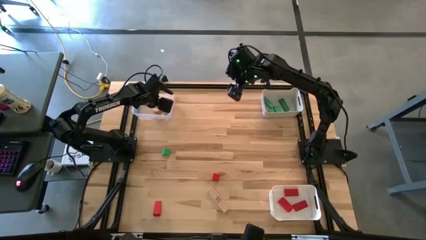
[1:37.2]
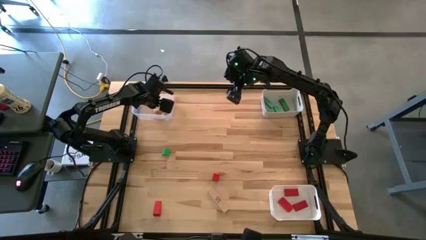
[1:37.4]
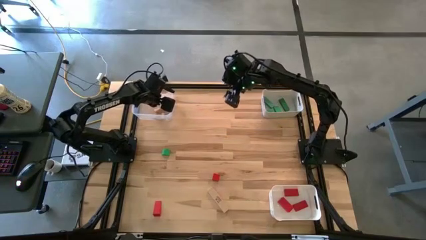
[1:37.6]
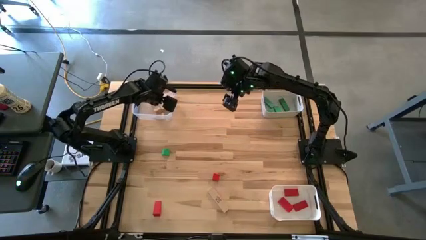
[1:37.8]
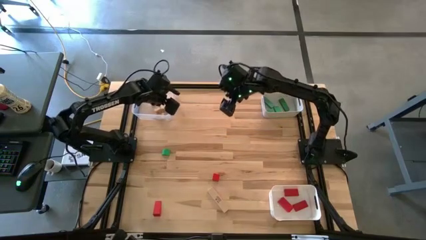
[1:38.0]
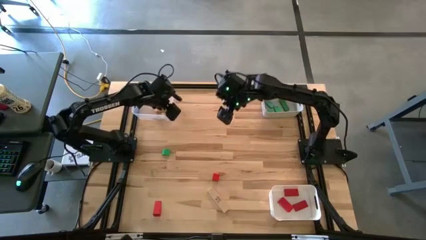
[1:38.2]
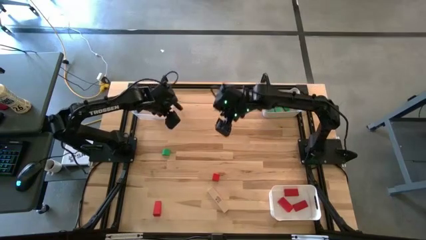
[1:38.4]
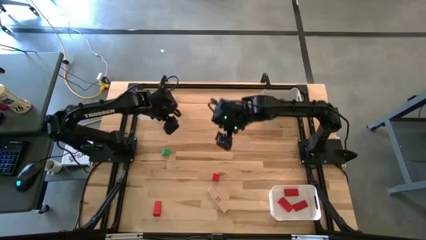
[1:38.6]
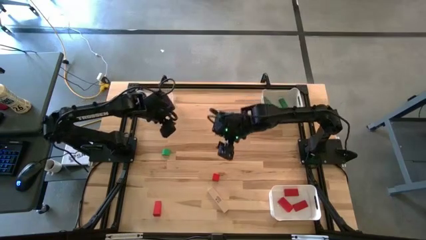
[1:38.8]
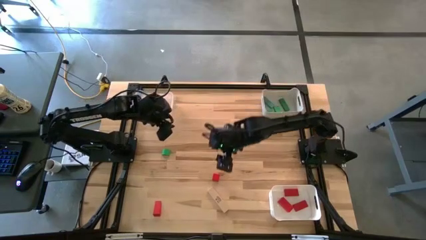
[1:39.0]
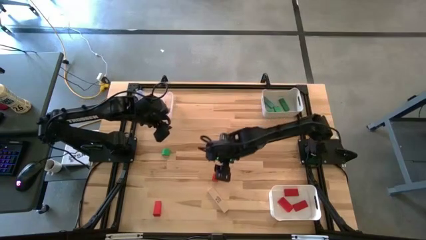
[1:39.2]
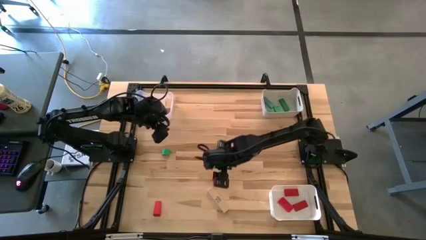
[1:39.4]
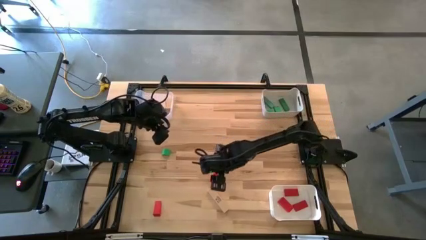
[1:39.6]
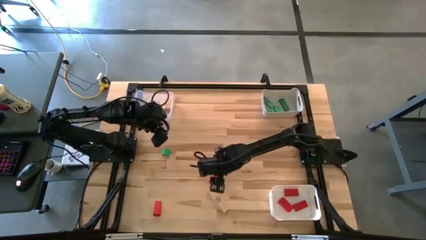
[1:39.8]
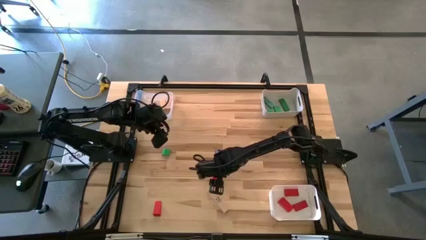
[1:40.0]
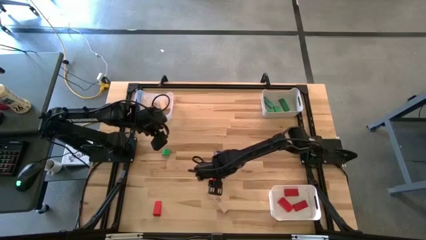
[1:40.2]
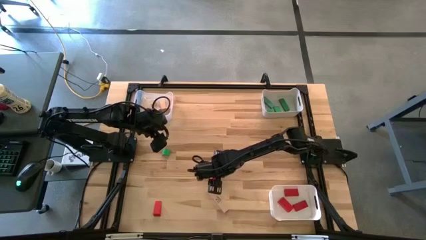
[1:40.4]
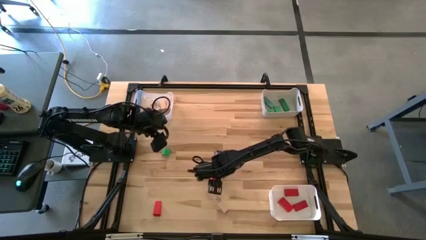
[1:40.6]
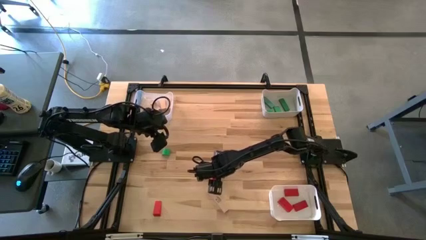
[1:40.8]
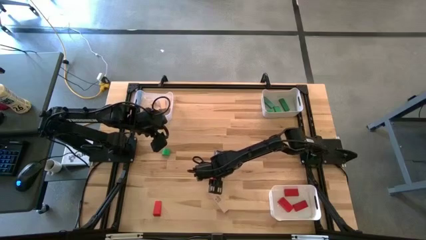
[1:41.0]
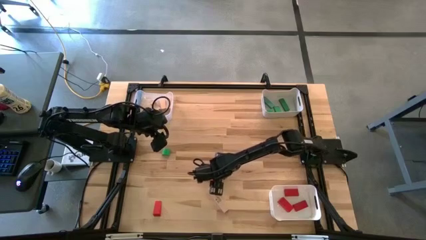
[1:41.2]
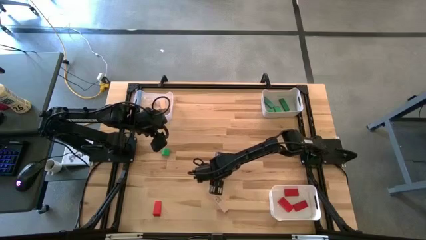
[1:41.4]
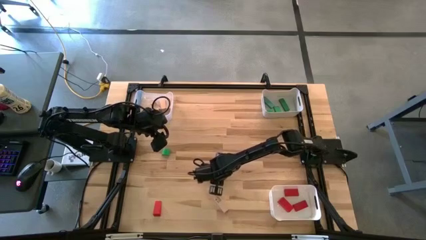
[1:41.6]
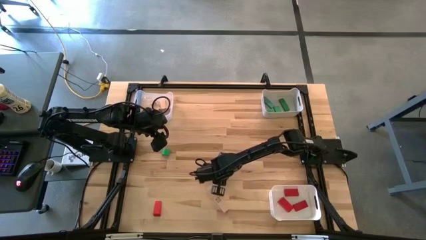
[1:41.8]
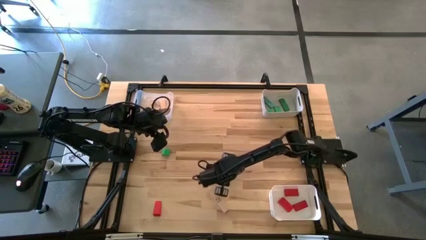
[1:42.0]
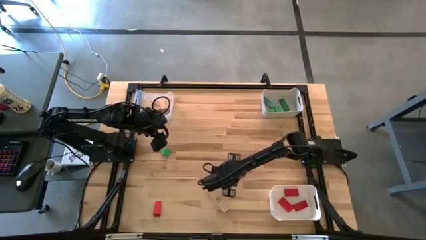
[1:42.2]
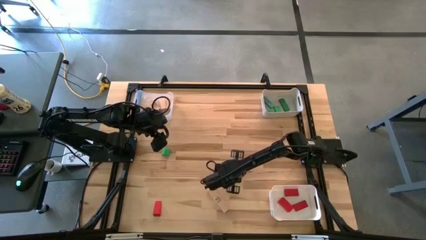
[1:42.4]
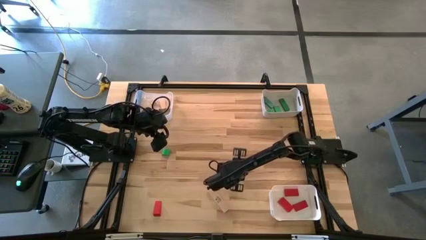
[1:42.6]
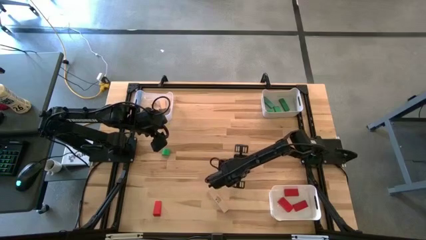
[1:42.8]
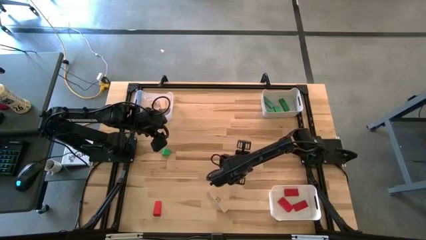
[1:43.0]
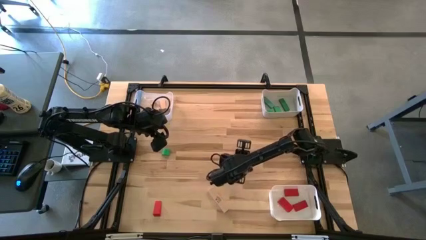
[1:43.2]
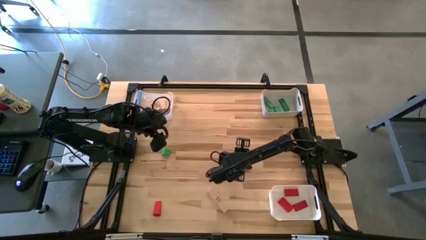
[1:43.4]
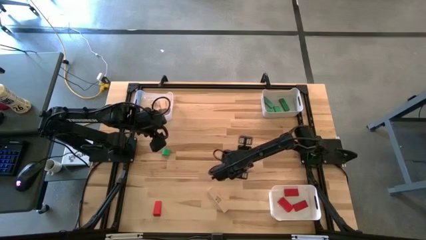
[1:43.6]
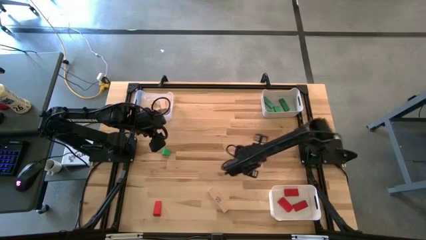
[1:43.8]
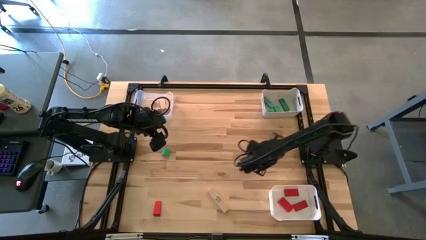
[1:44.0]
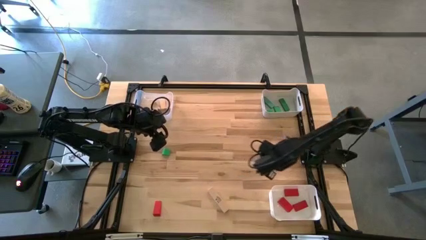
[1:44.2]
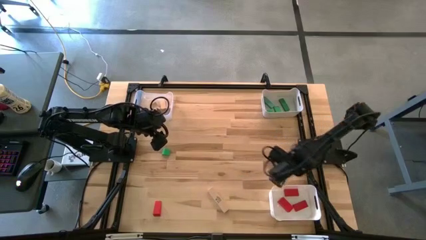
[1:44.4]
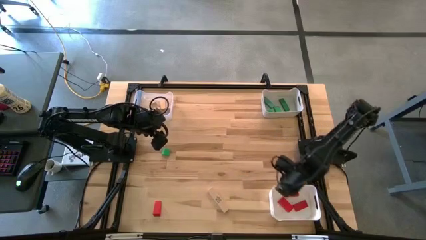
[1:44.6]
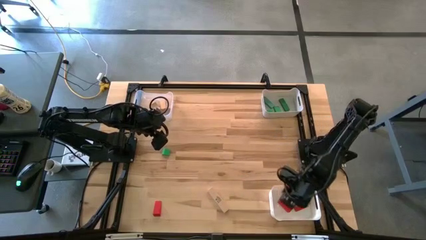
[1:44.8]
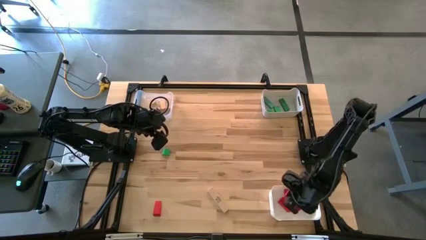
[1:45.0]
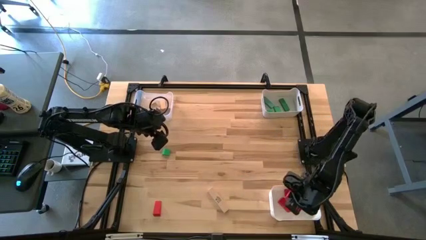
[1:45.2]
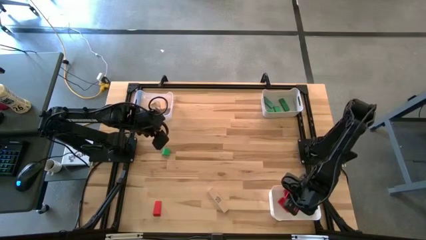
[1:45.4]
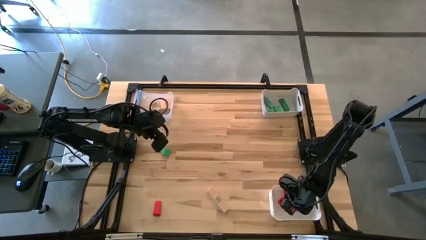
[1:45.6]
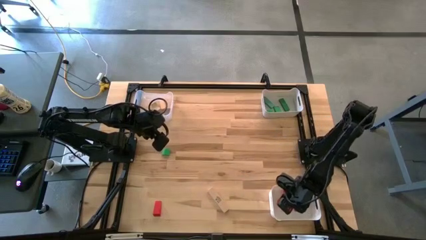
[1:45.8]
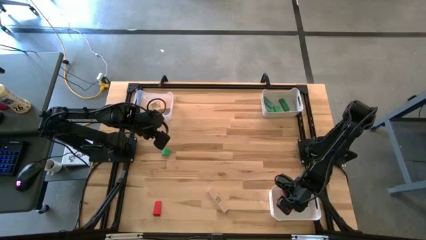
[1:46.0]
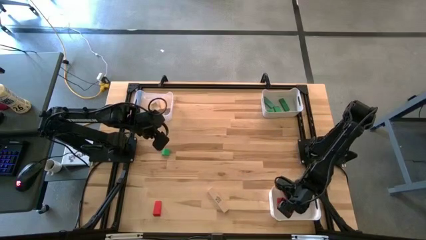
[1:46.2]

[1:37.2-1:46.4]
Task: Sort & place blocks by color
Put the red block into the white bin

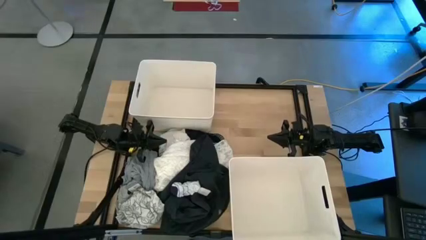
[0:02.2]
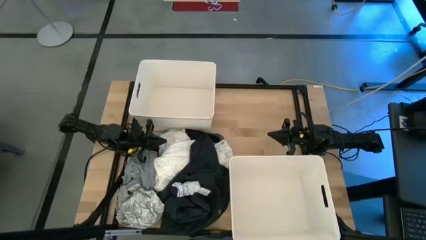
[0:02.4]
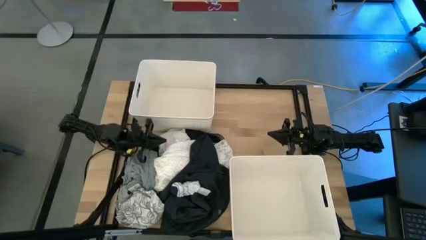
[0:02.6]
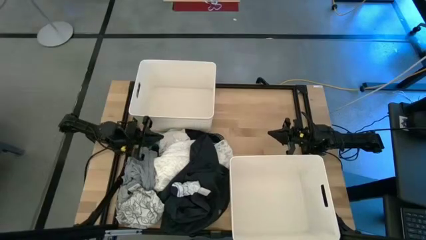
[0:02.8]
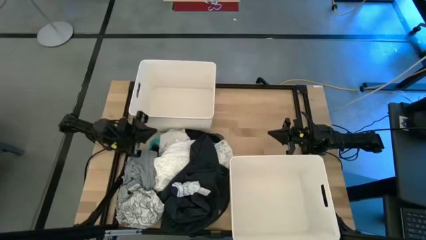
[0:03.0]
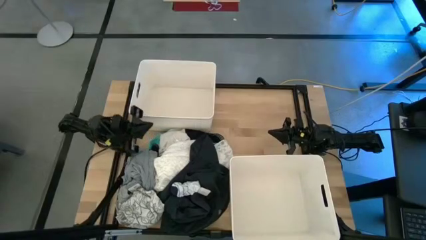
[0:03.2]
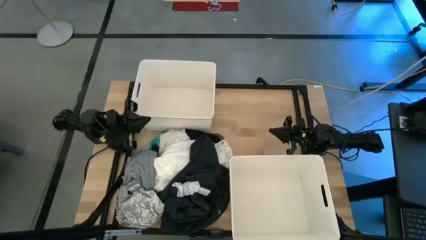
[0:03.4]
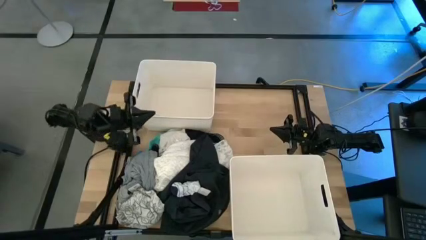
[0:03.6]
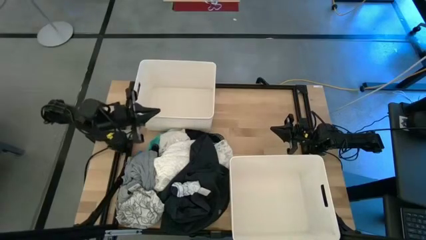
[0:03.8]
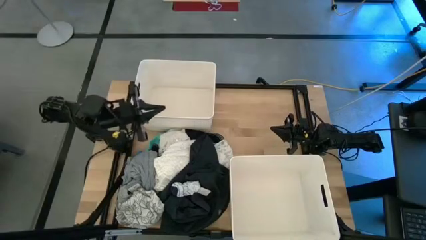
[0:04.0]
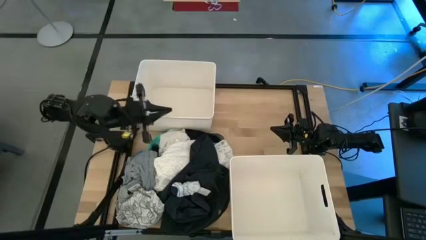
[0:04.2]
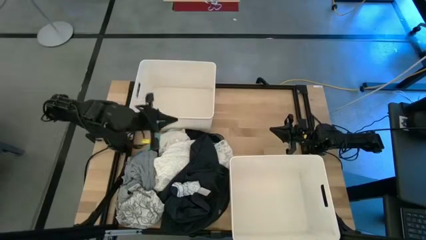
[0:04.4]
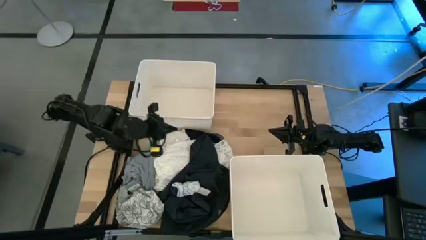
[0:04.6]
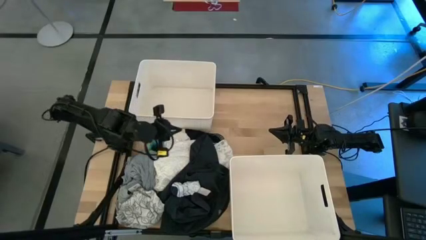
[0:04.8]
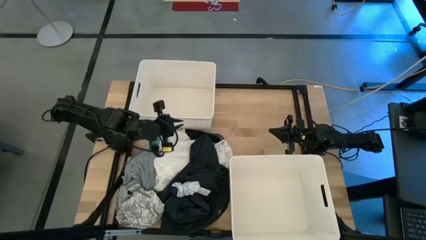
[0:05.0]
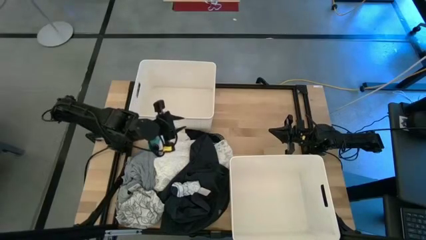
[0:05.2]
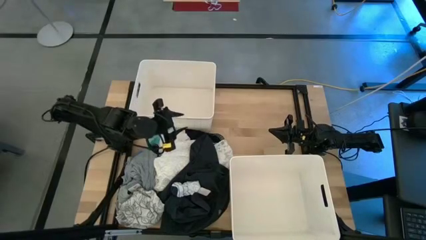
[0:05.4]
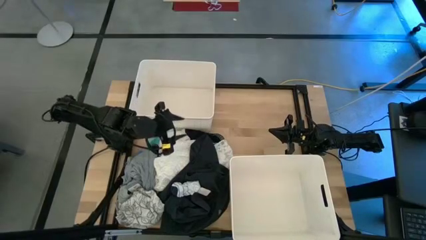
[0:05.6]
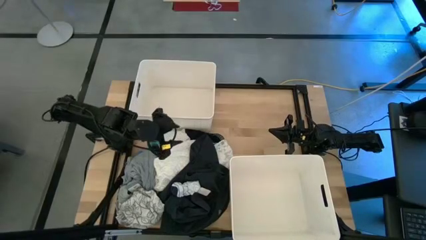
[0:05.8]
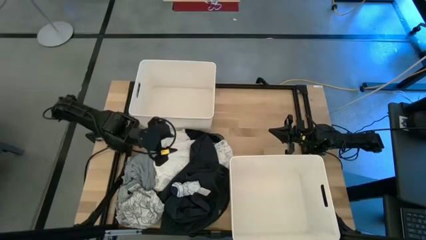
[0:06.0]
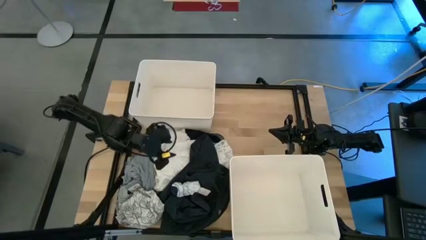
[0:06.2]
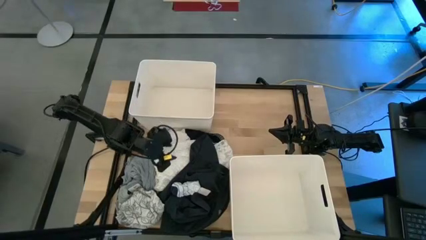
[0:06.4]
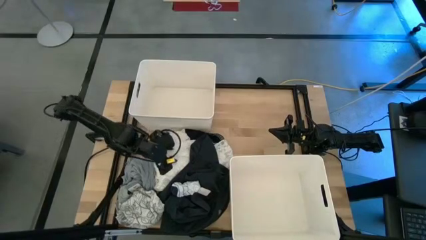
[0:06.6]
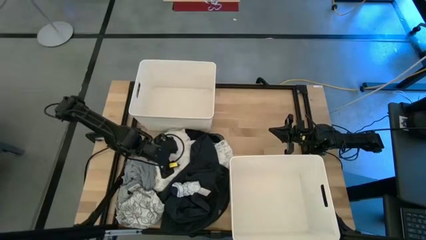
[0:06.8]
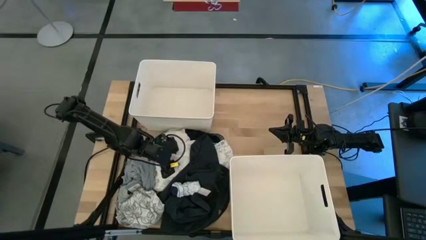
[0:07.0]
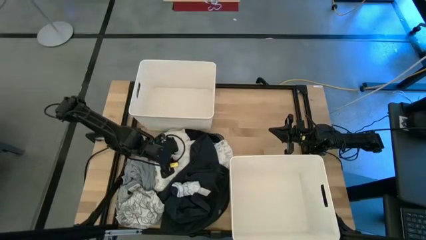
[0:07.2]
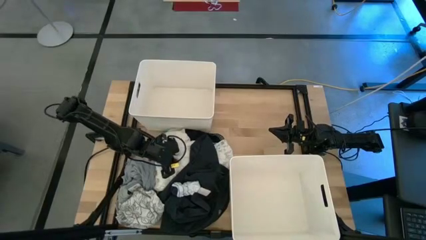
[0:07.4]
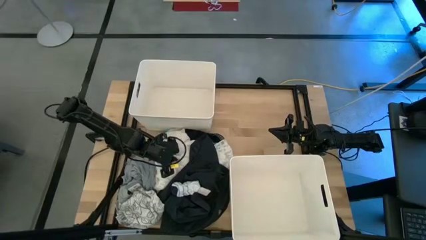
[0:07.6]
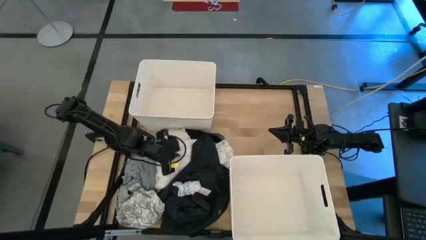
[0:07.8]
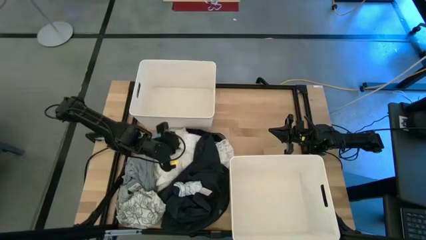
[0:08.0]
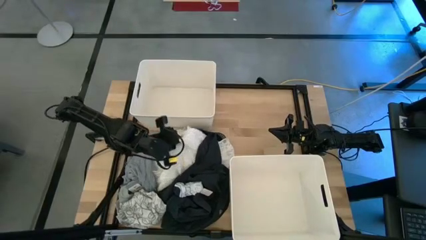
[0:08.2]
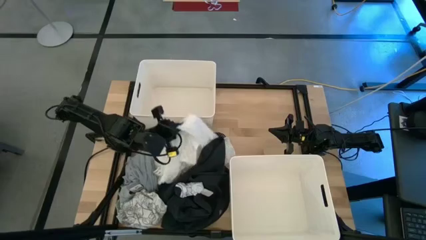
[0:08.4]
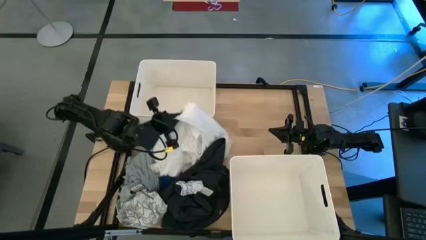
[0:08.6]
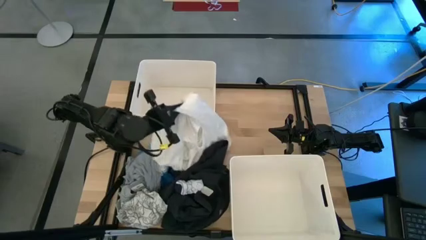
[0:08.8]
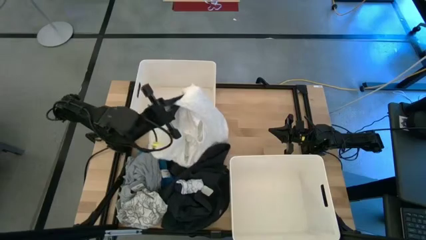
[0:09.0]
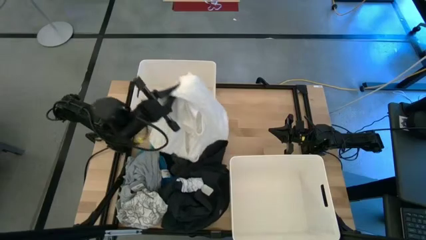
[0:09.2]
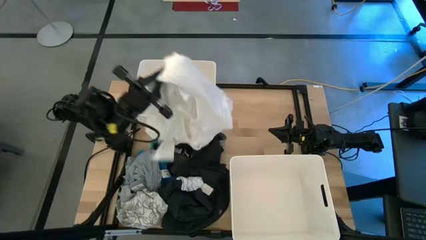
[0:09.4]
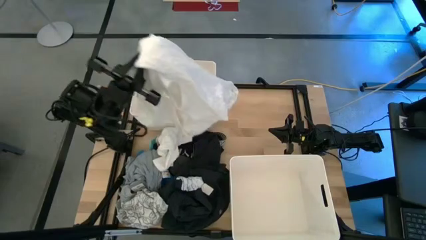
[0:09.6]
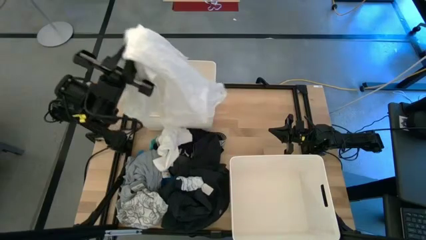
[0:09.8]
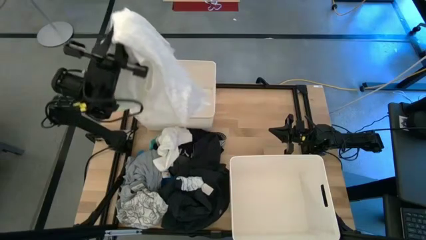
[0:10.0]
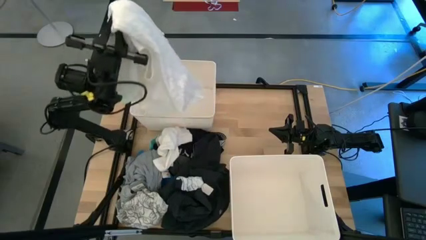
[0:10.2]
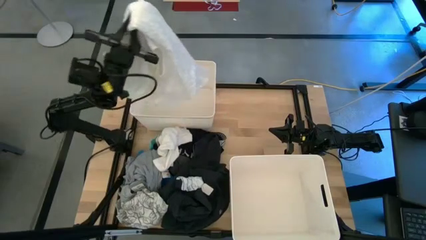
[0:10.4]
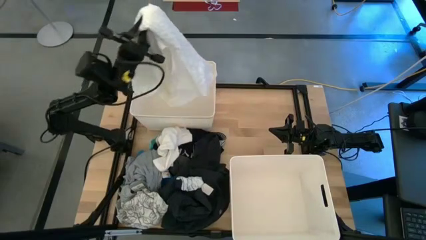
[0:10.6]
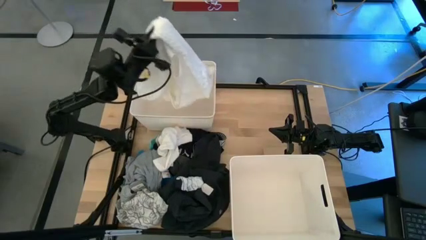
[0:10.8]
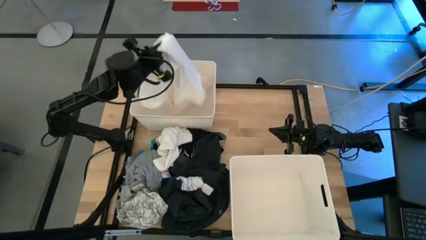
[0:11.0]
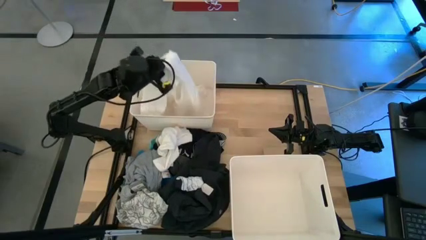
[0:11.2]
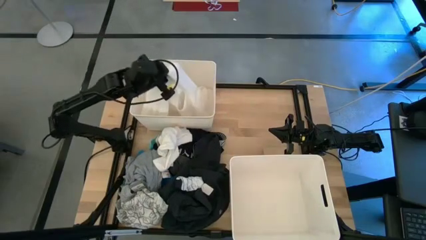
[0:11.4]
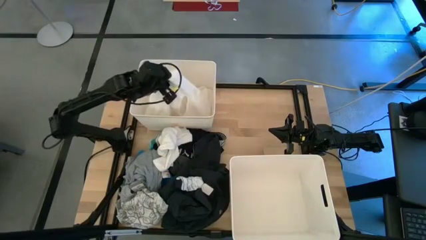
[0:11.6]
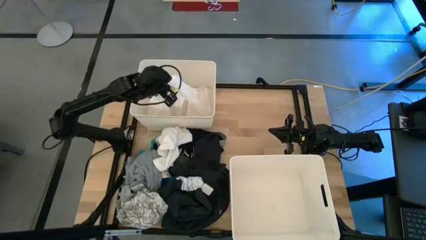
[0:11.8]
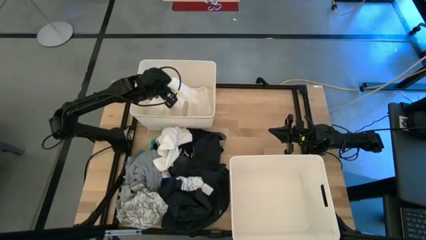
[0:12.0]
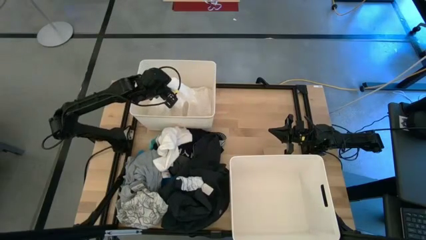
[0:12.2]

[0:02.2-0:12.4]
Task: Sort clothes
Put the white dress into the top left laundry bin
